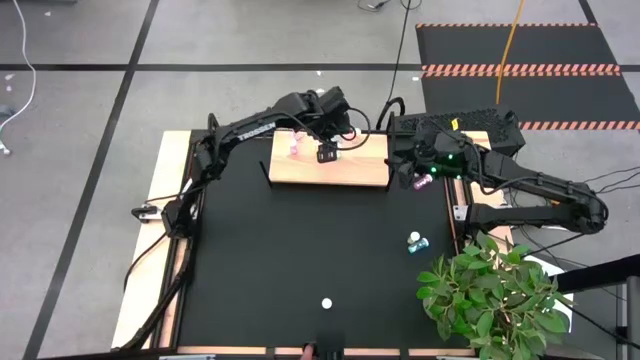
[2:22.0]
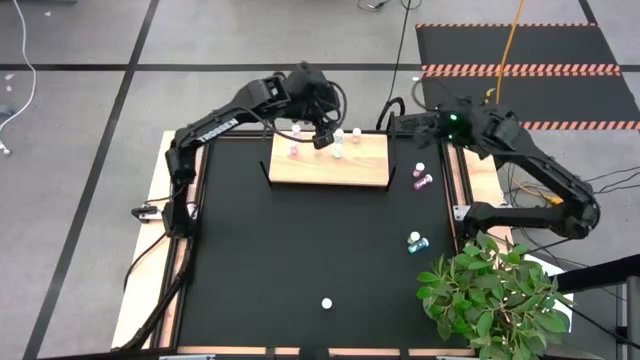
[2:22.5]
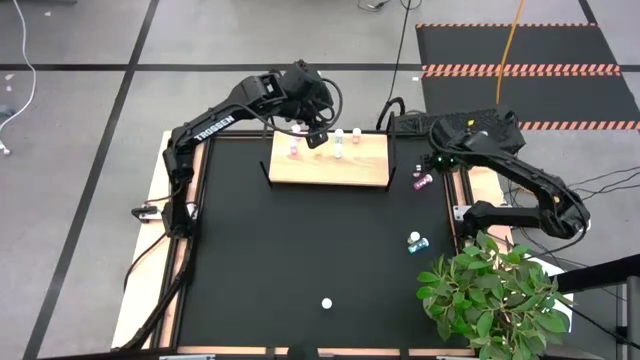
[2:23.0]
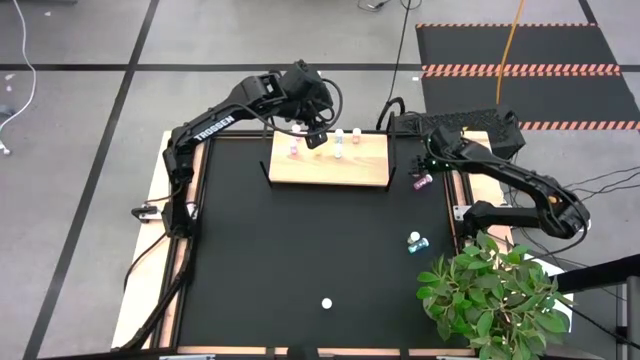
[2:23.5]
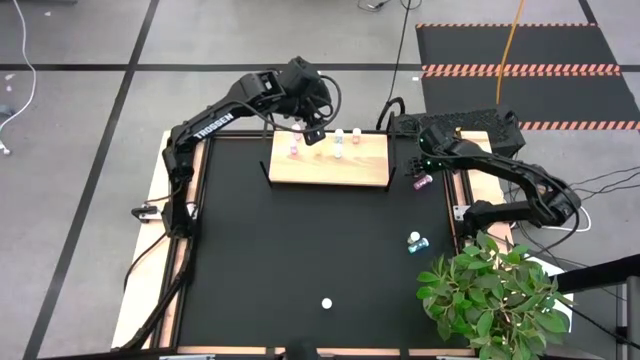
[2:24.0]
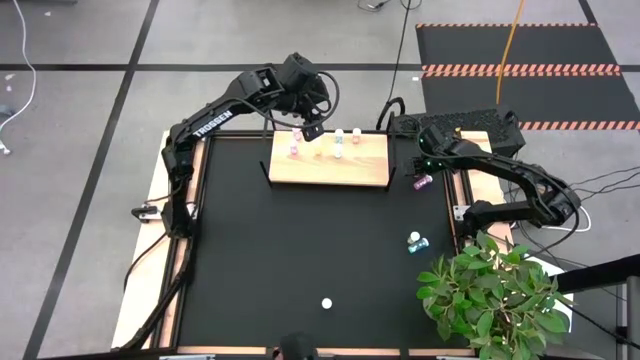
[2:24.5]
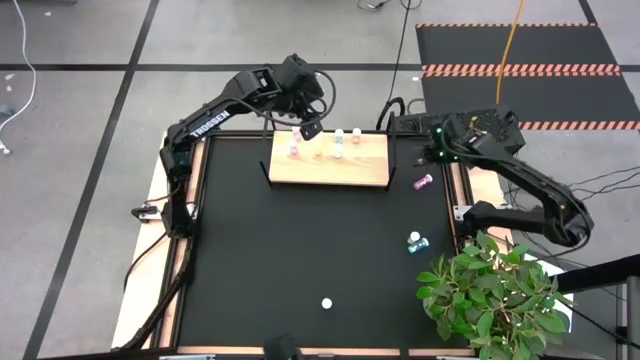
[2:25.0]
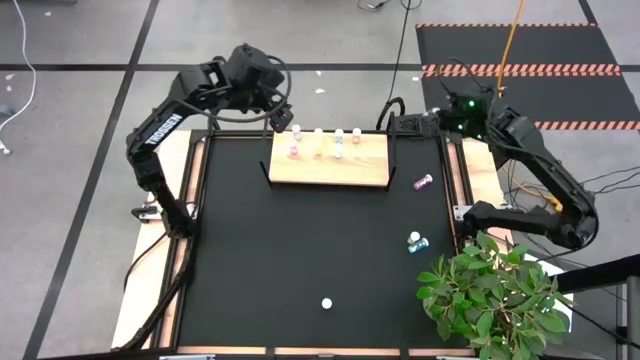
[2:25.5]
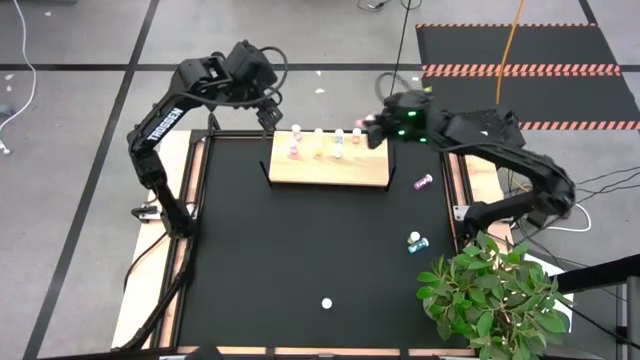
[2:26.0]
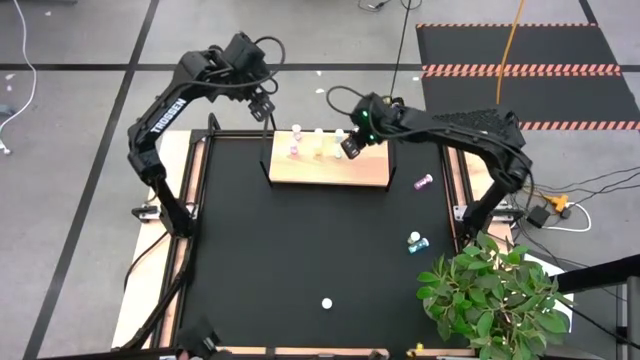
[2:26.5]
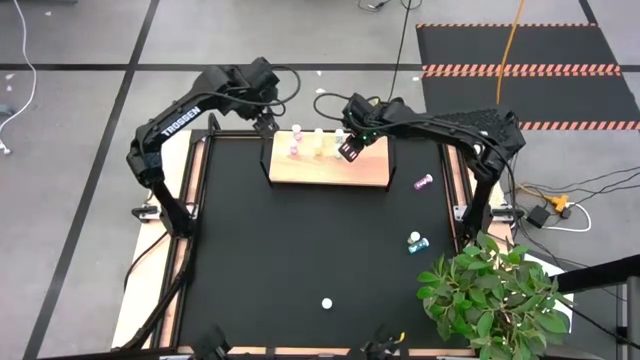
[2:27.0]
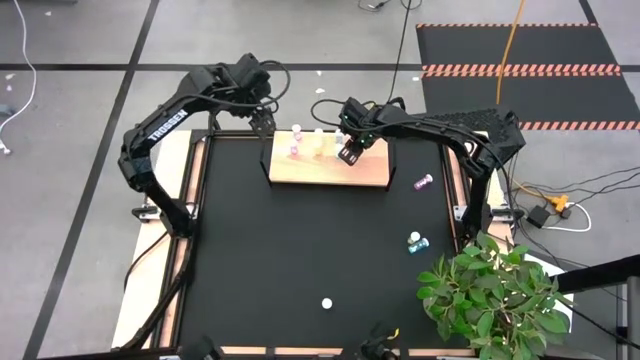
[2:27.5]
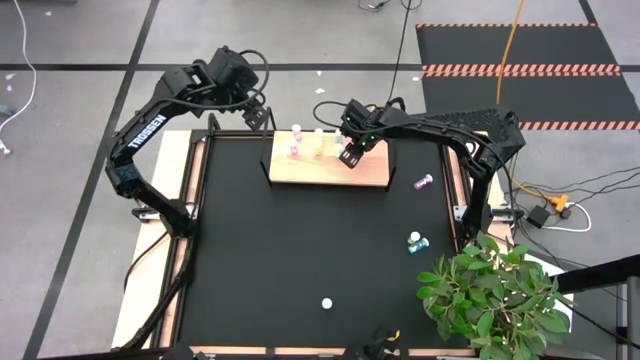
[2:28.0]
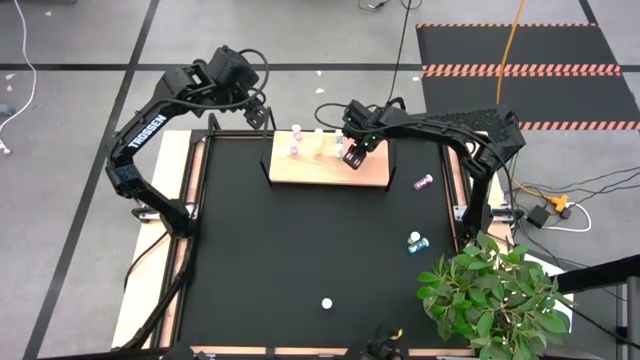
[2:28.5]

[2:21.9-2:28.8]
Task: Pick and place medicine bottles onto shelf by color
Put the top orange pill bottle on the shelf aligned with the other orange pill bottle

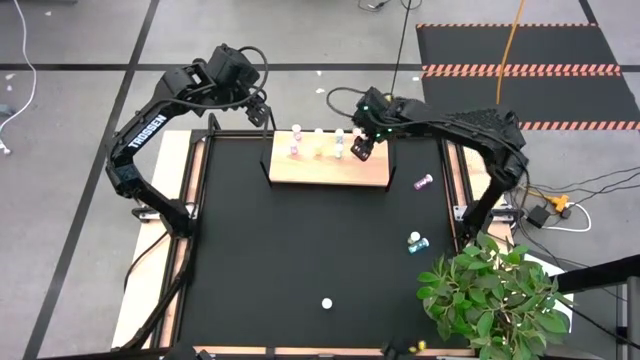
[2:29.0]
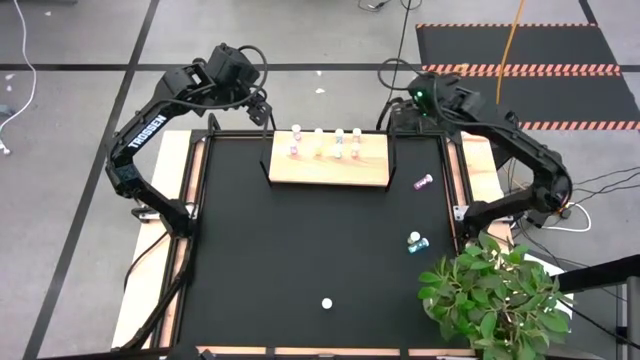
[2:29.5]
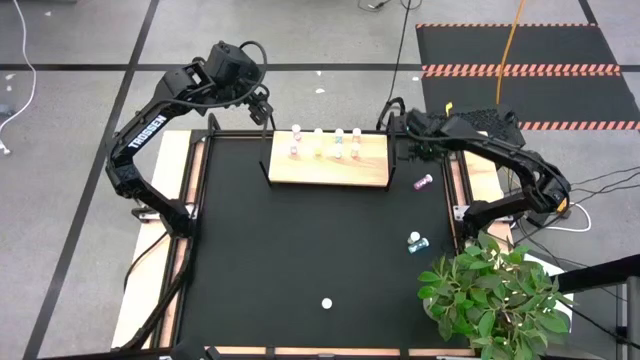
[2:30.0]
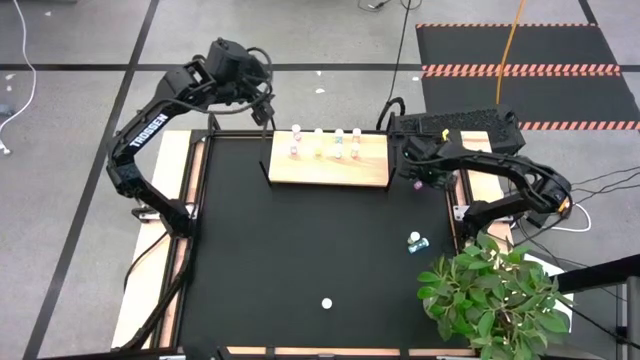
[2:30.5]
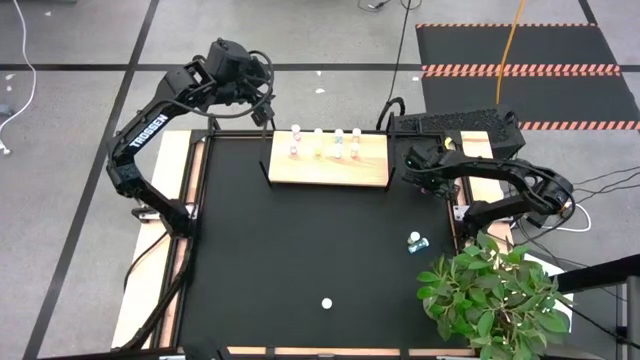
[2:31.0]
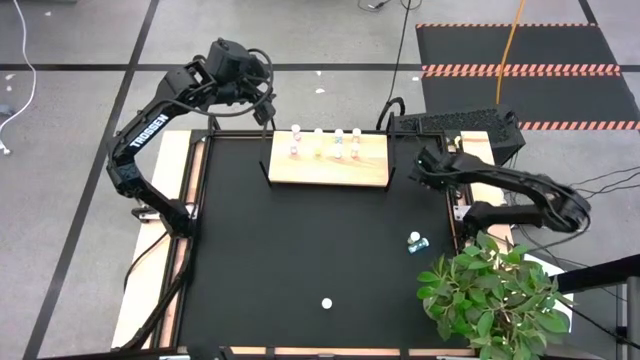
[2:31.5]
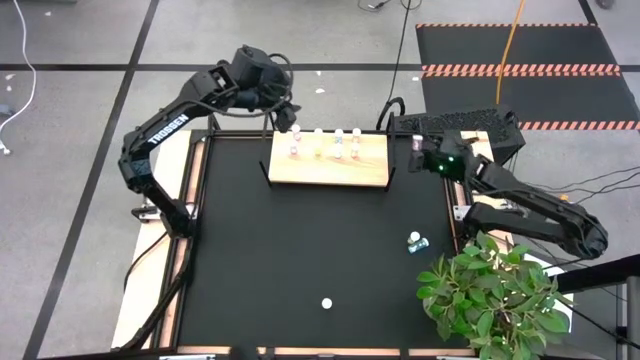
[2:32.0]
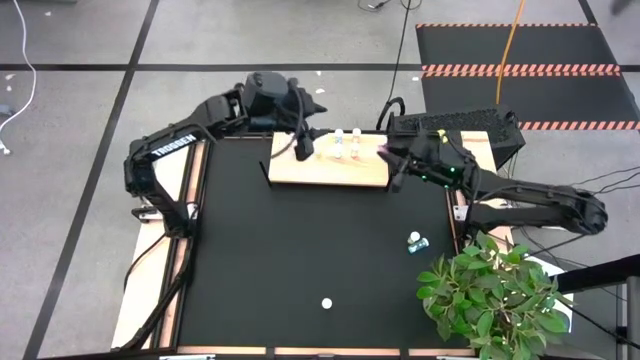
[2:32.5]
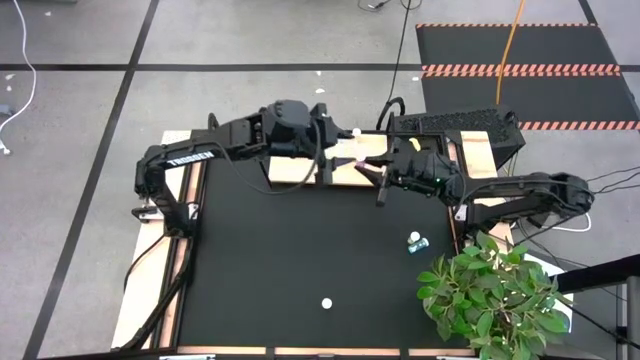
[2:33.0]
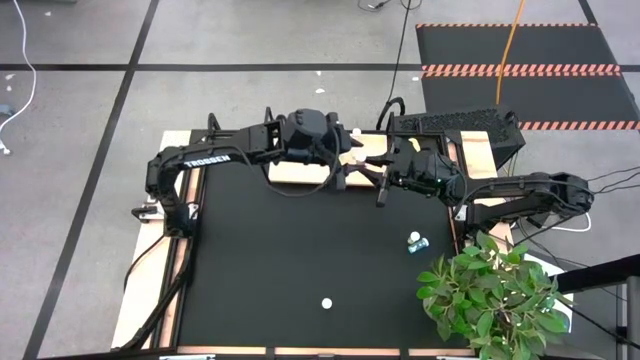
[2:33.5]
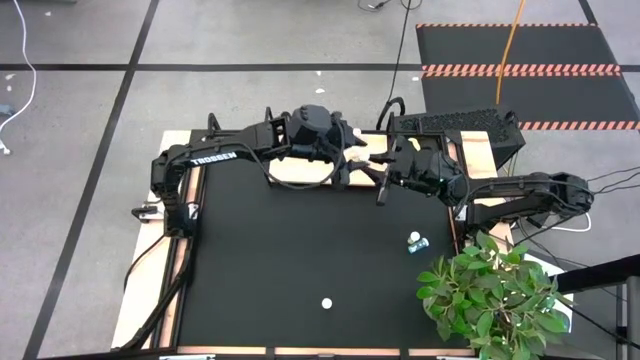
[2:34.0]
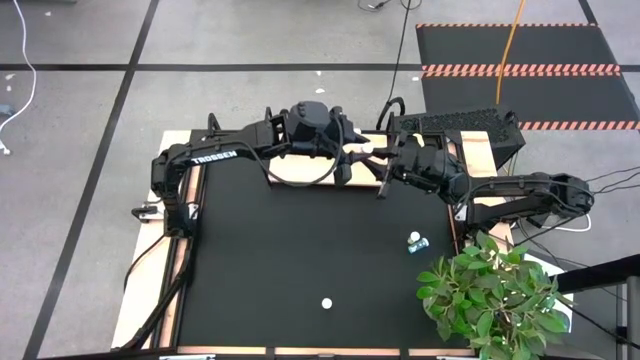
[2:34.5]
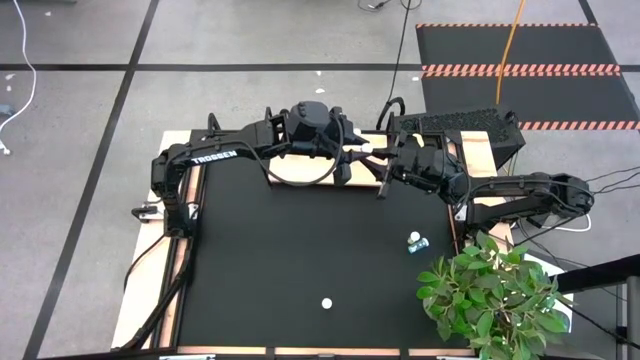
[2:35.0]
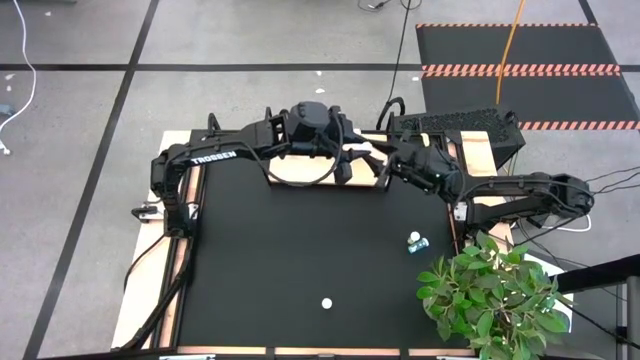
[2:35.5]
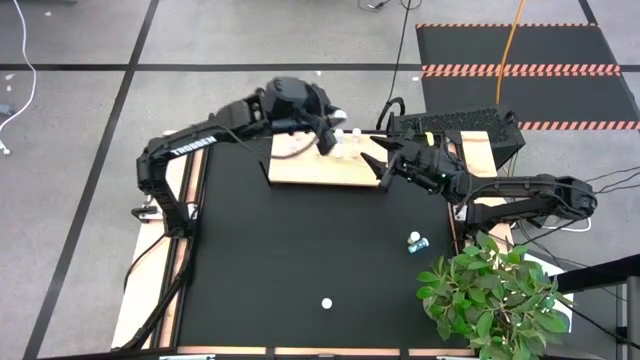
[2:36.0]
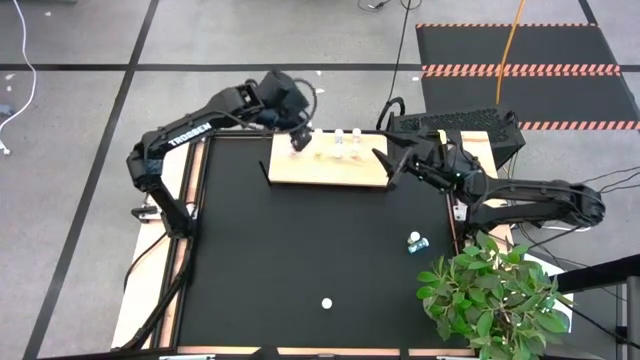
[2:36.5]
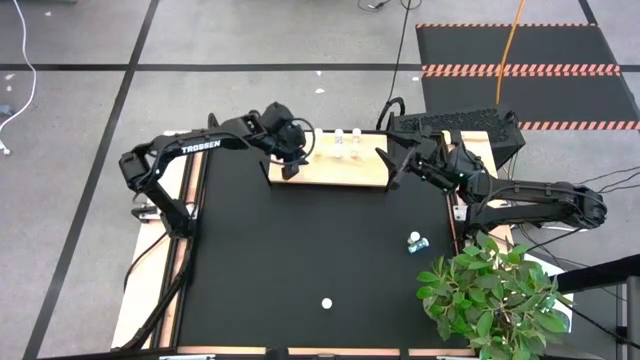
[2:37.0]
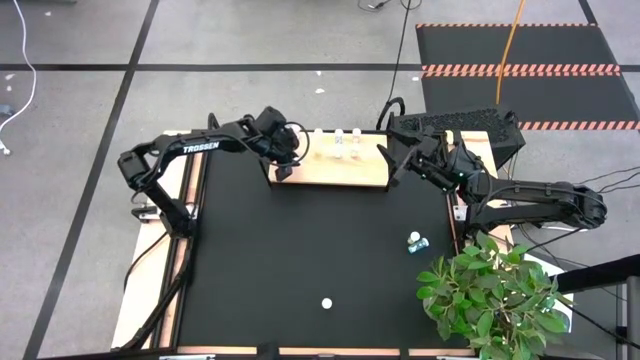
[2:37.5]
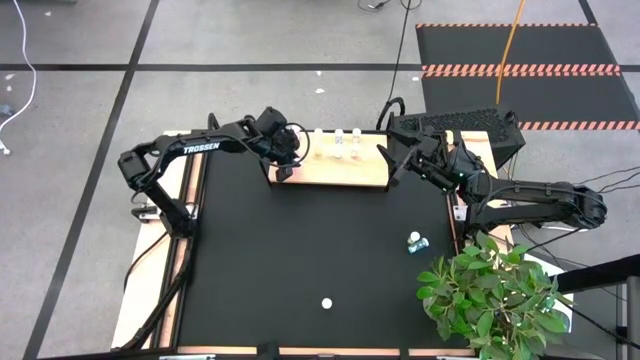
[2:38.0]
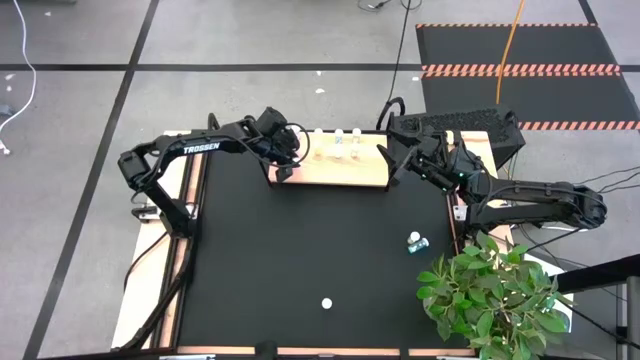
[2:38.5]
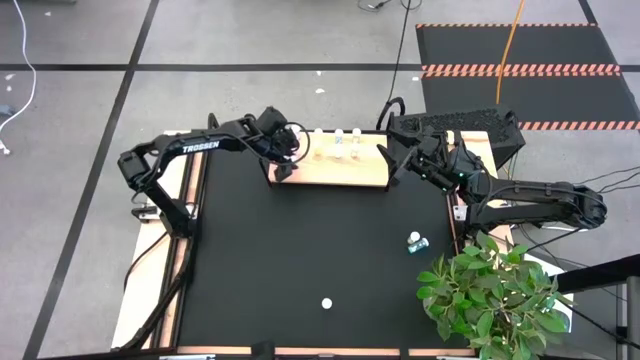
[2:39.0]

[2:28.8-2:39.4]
Put the pink pill bottle on the shelf aligned with the other pink pill bottles

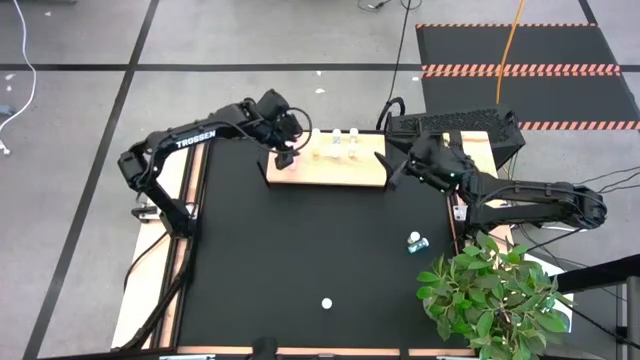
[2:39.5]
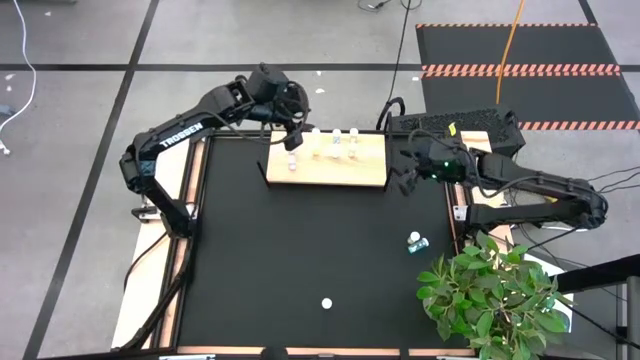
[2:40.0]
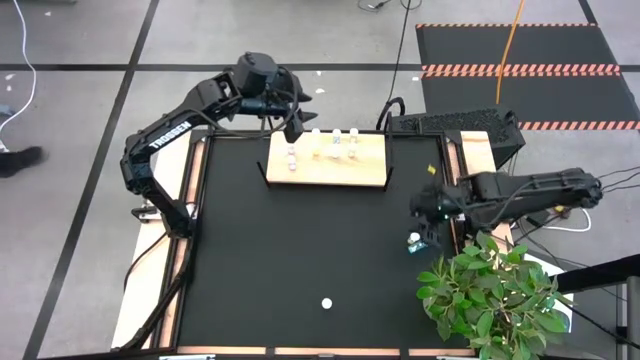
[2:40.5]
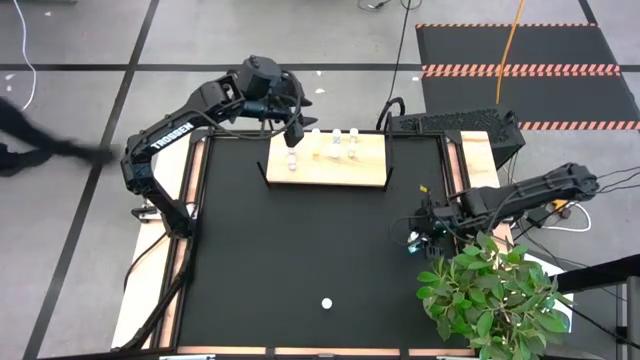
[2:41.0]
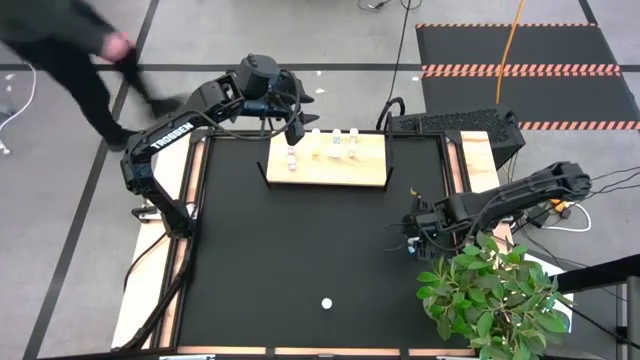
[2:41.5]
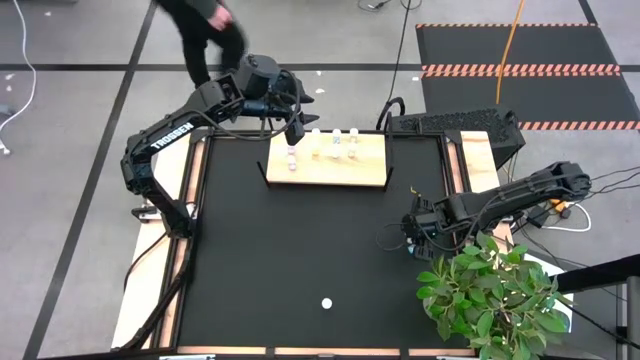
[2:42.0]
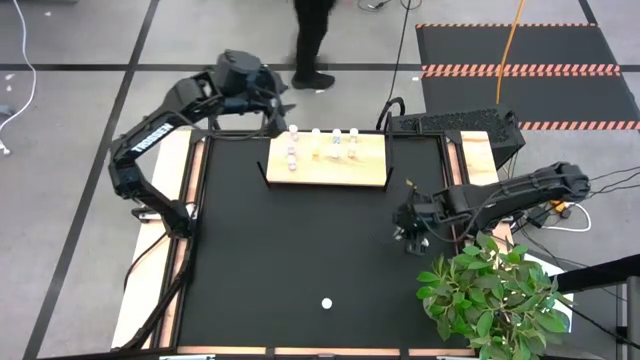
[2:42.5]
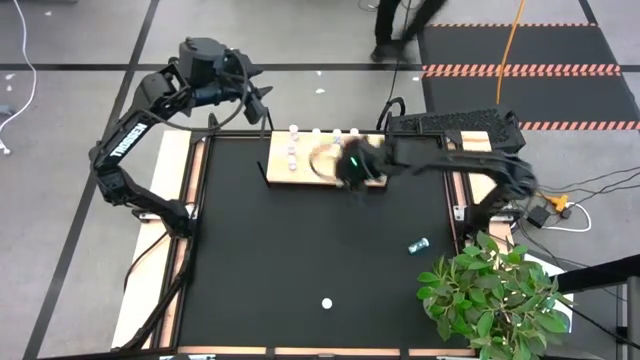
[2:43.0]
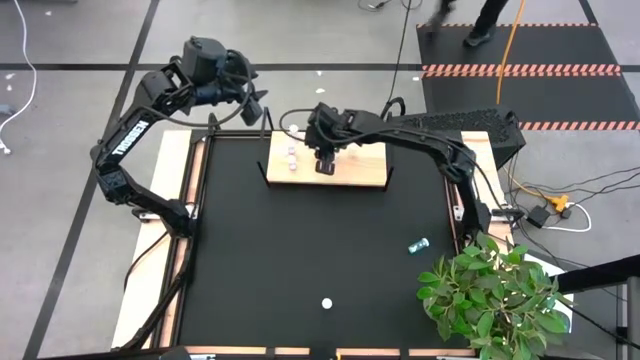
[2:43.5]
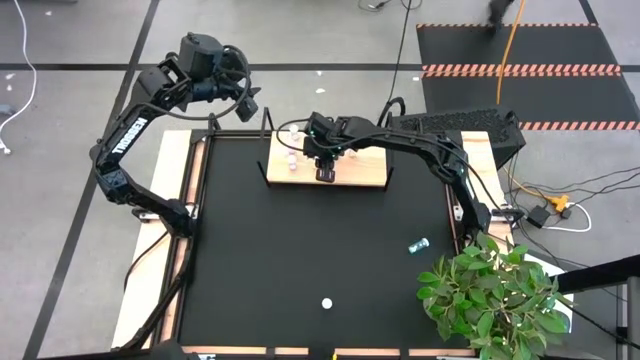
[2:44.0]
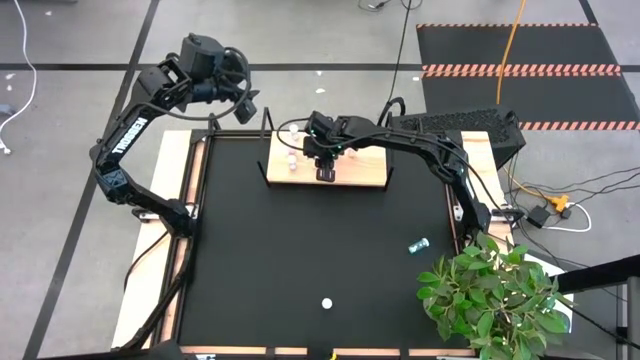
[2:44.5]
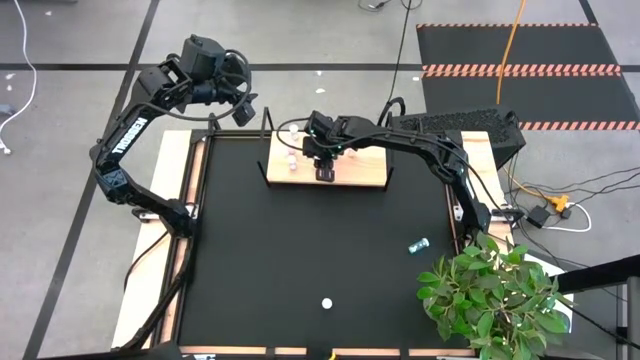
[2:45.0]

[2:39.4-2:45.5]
Put the yellow pill bottle on the shelf aligned with the other yellow pill bottles
